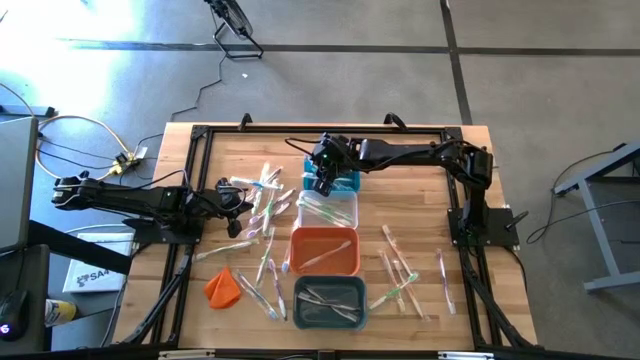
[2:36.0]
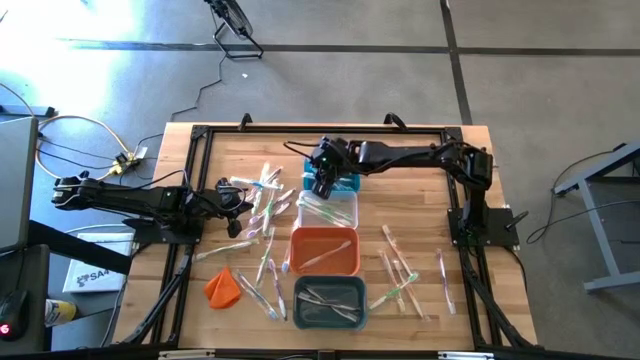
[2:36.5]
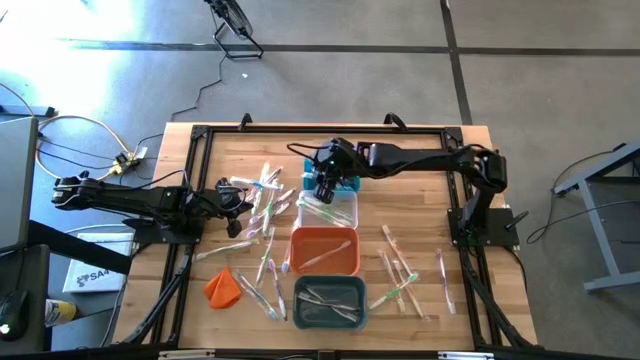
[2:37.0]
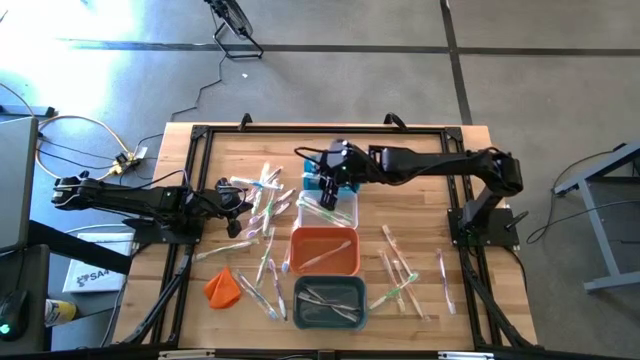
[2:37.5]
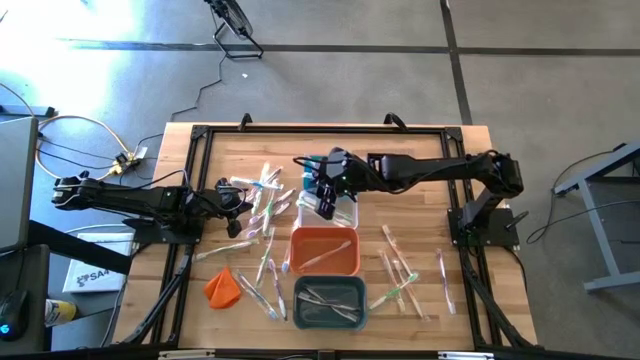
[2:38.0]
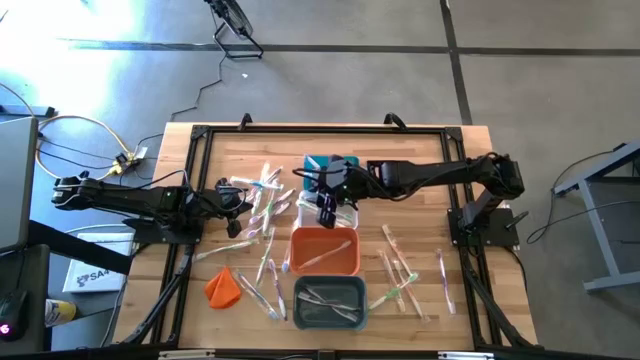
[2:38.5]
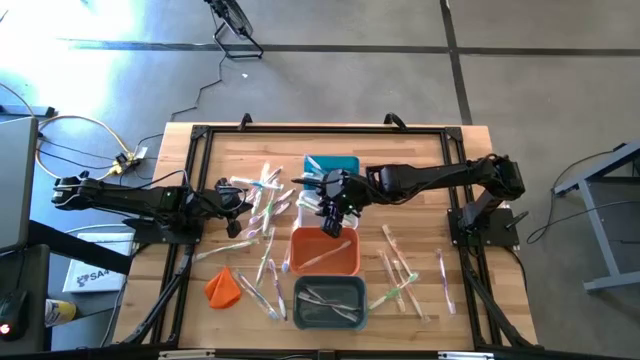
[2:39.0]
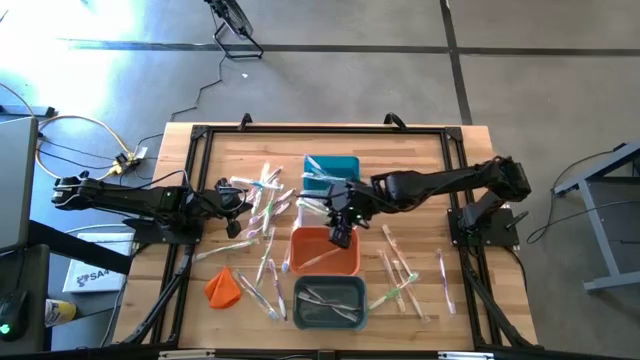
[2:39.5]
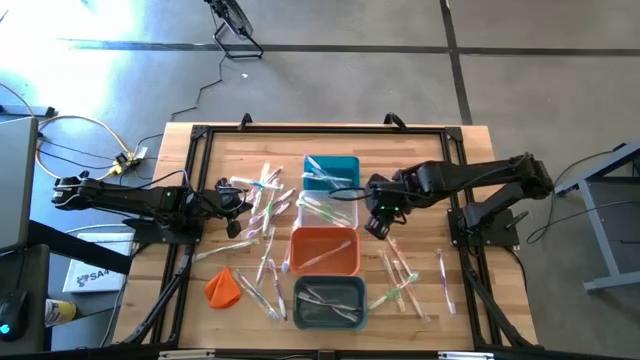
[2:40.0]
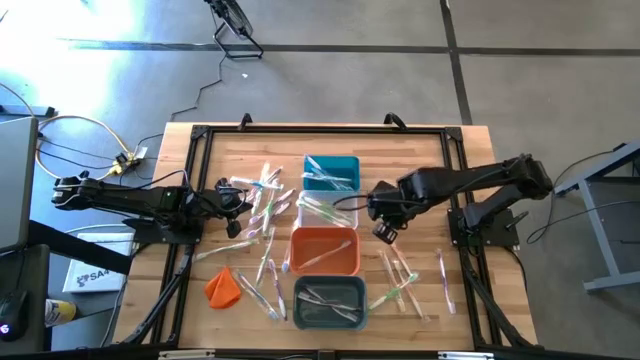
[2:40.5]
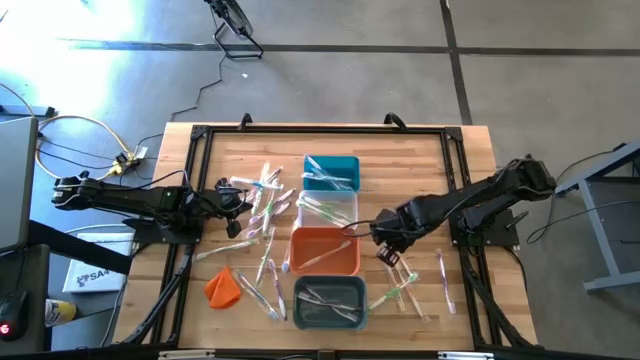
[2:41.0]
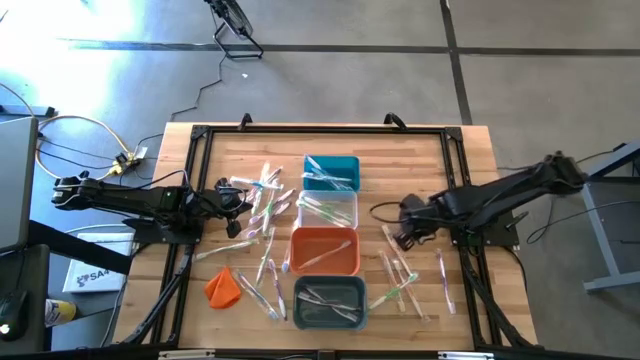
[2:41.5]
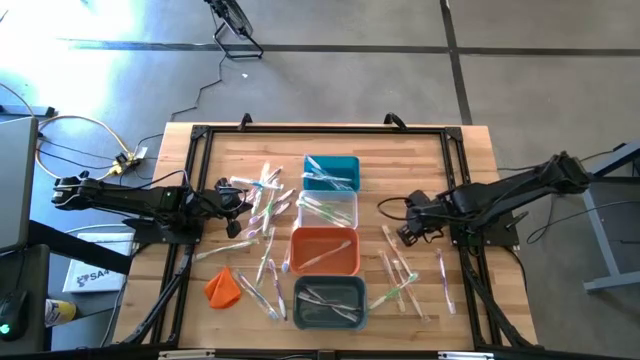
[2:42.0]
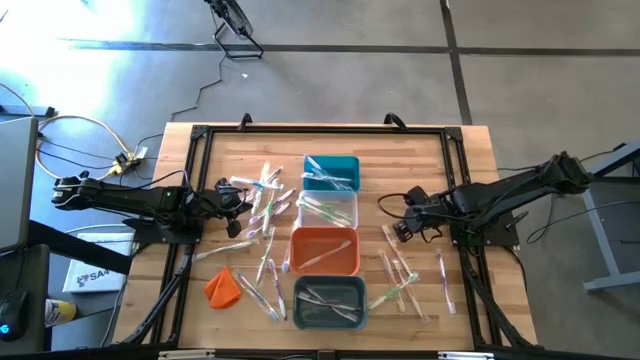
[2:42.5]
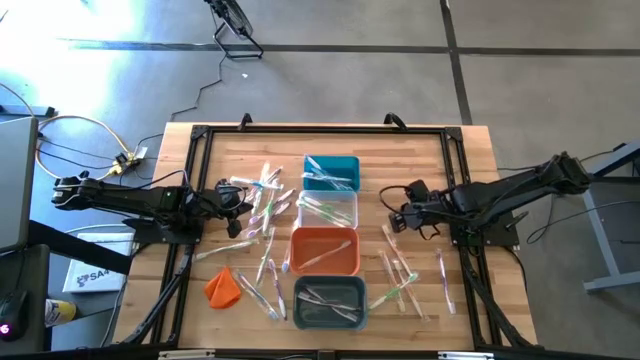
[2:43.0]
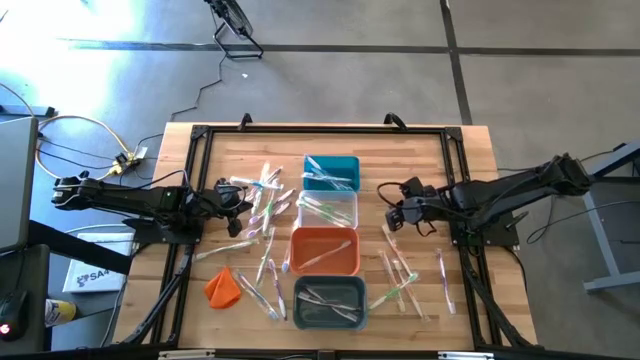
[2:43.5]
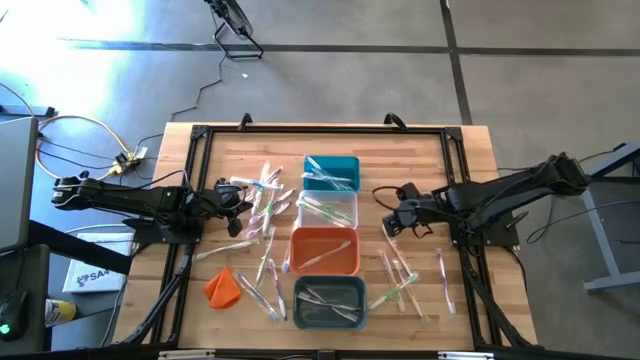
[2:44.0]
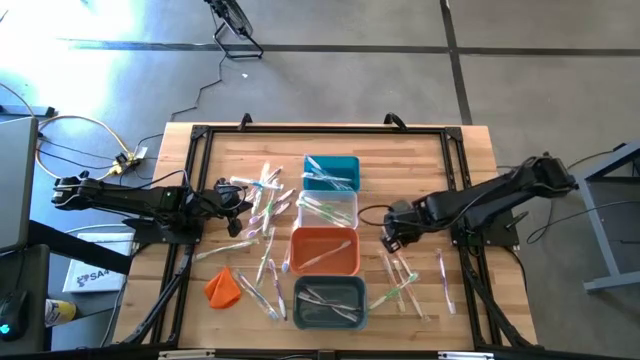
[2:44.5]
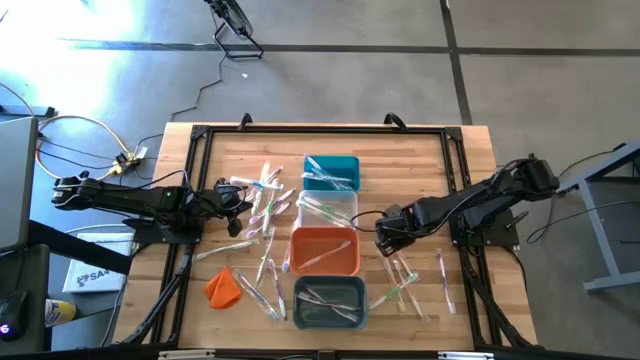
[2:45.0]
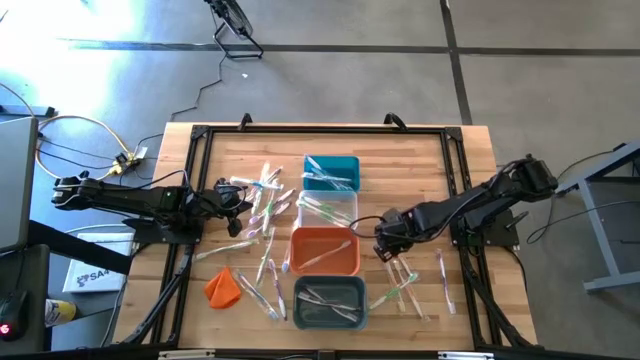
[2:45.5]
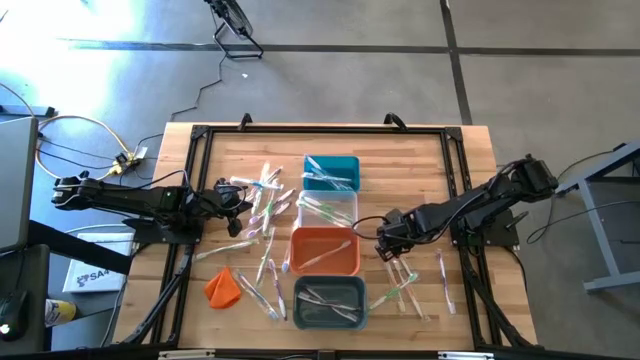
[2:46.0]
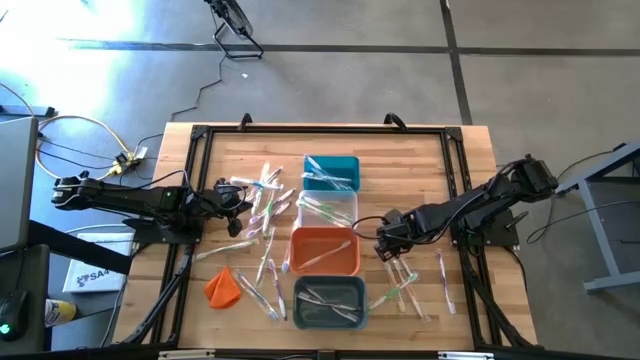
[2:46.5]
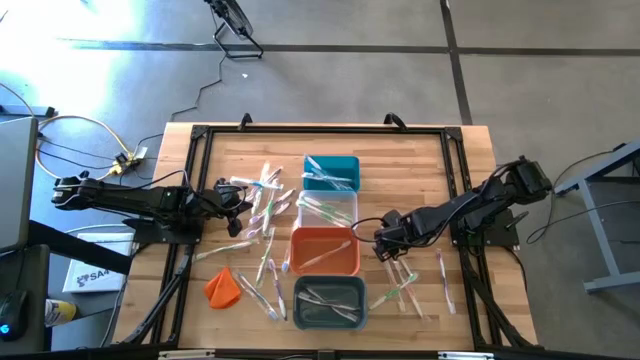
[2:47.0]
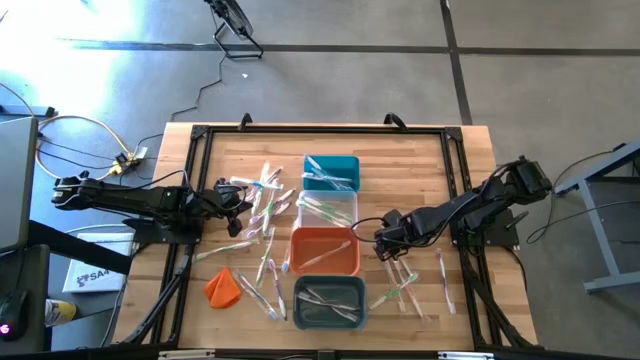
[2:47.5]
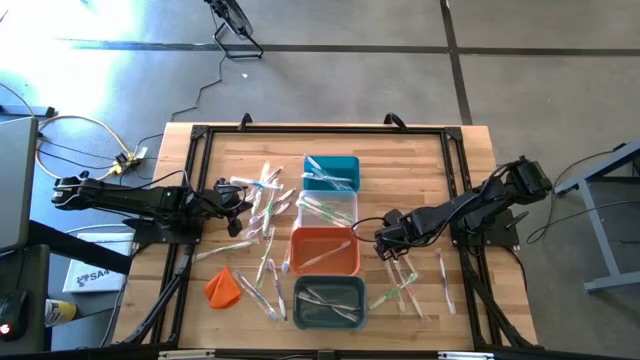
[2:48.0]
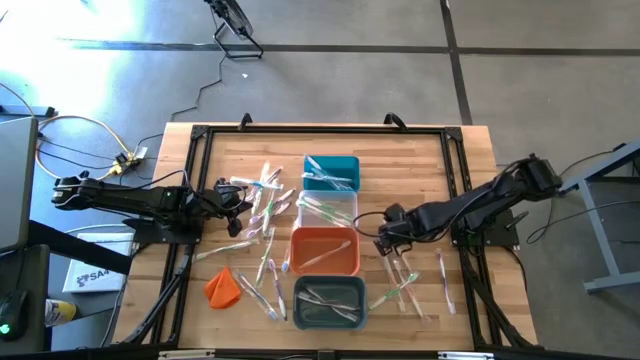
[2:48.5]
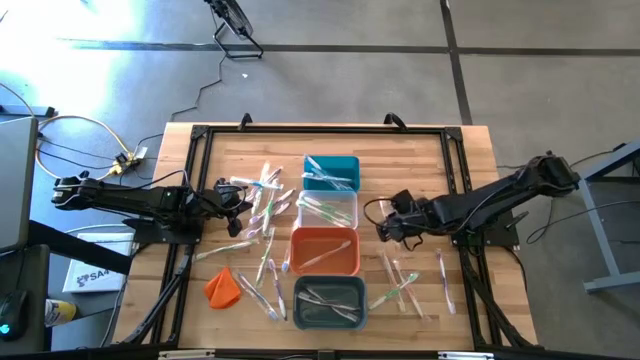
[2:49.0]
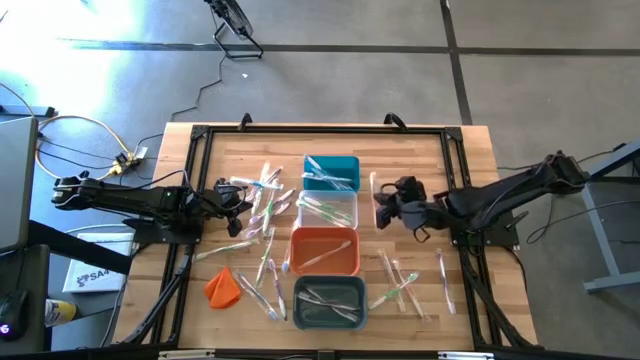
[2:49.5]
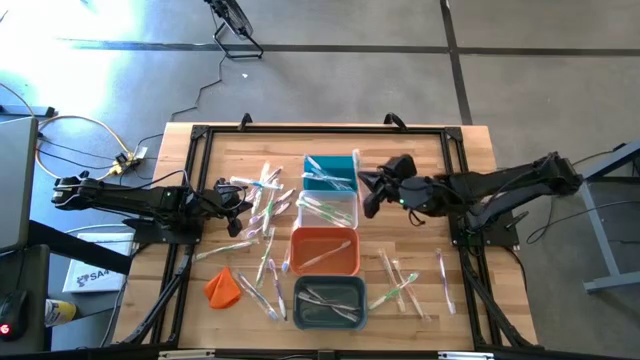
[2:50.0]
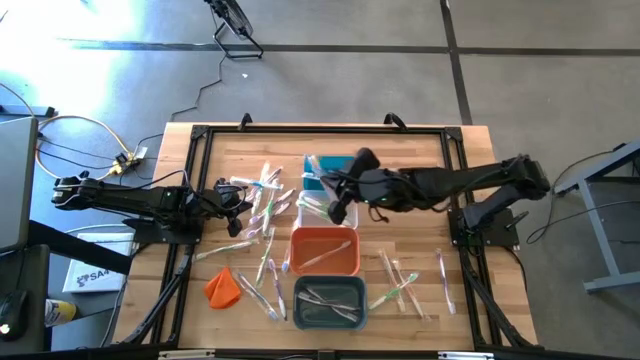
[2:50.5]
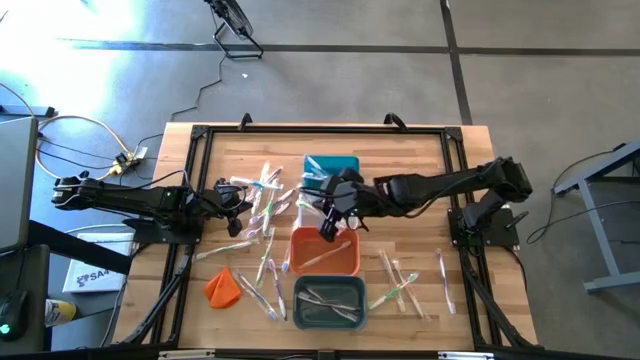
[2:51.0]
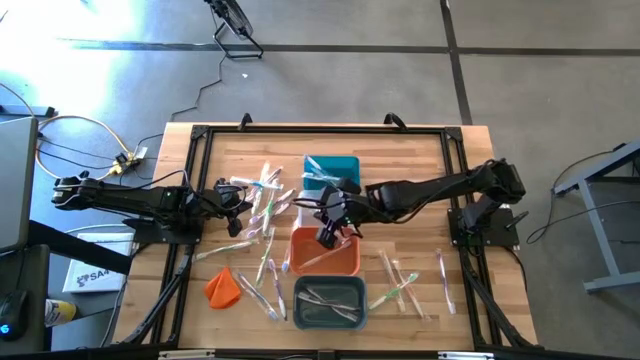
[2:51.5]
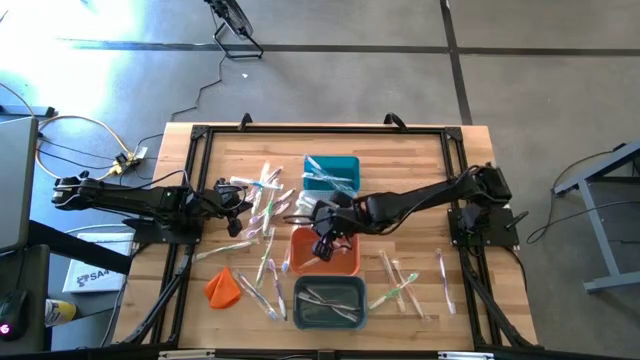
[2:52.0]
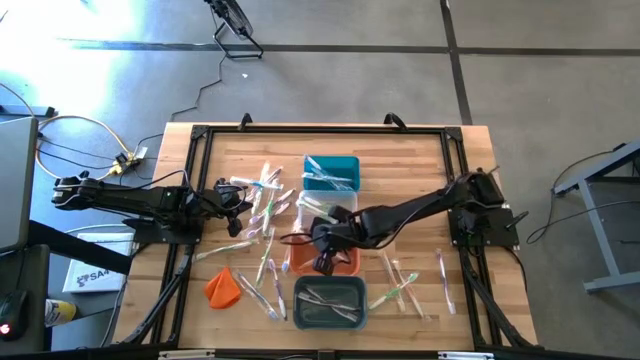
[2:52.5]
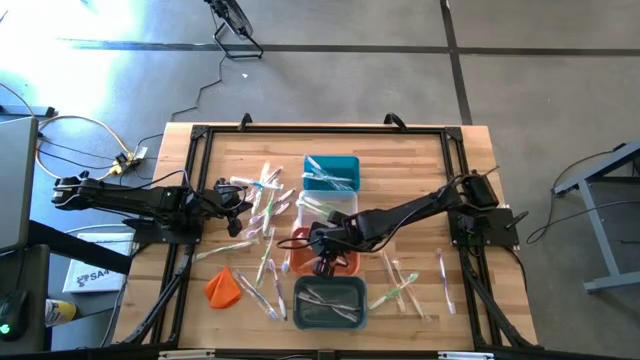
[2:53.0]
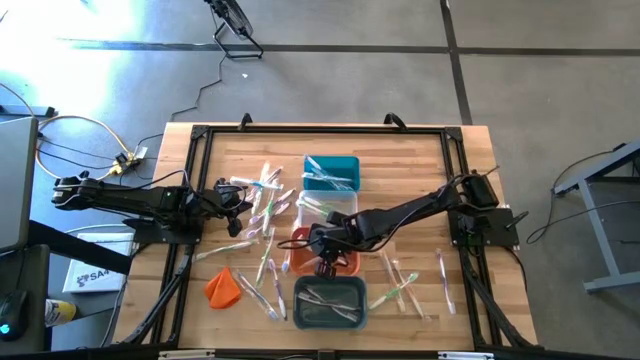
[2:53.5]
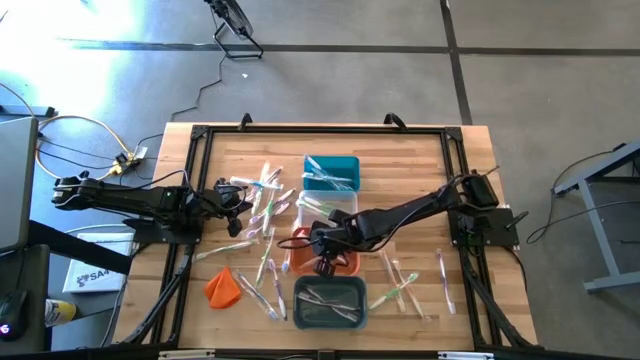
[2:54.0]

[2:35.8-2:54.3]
Task: Pick & Place Toothbrushes
Put the orange toothbrush into the orange bin

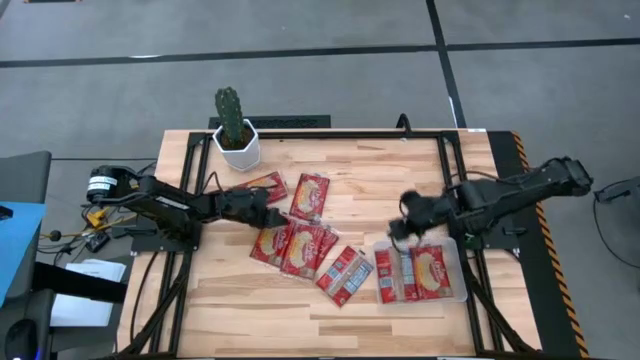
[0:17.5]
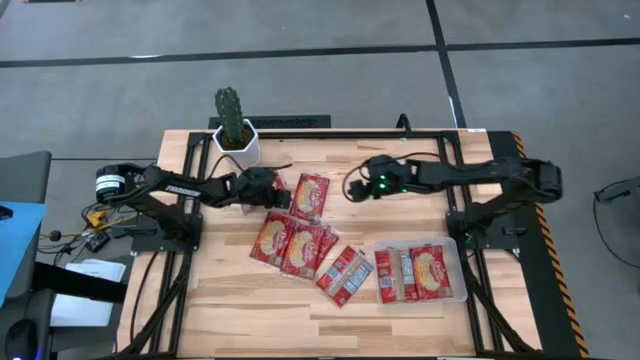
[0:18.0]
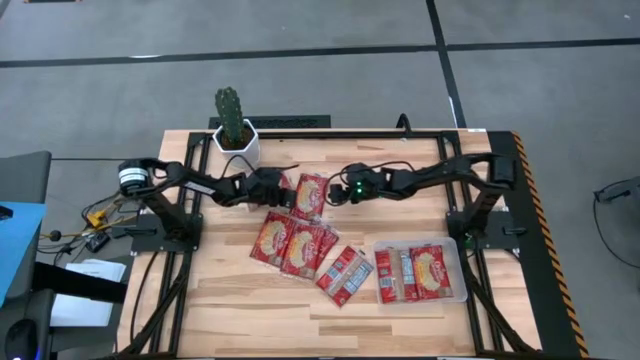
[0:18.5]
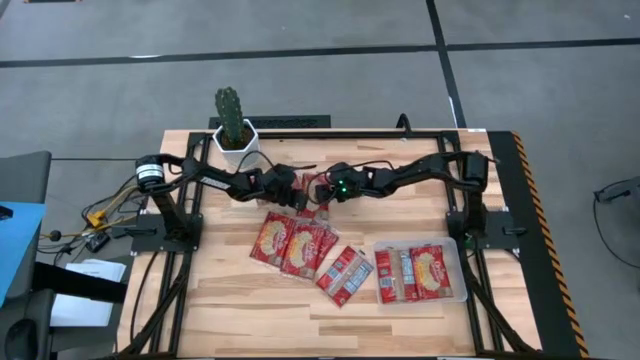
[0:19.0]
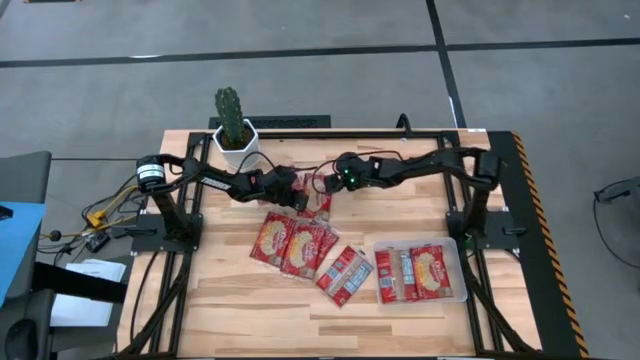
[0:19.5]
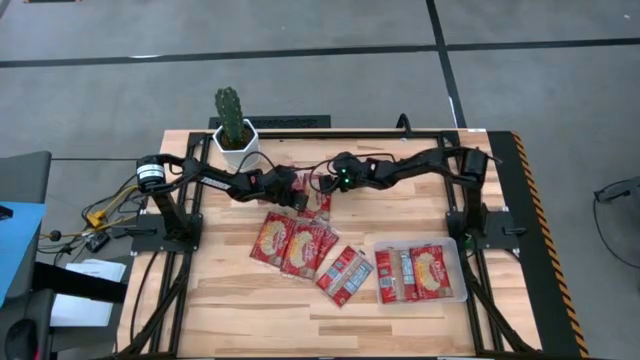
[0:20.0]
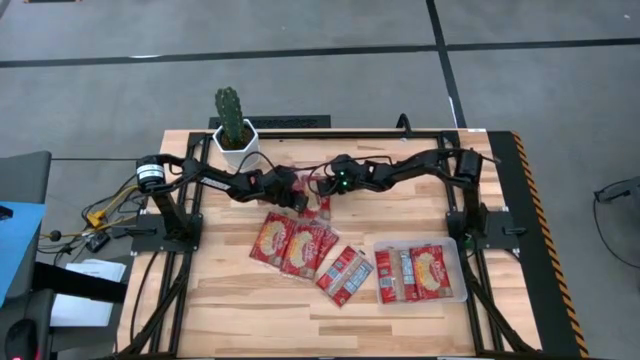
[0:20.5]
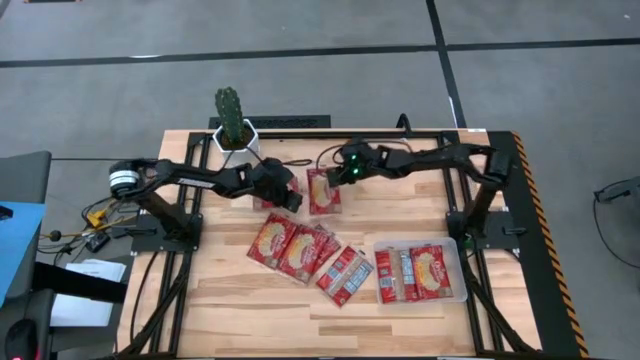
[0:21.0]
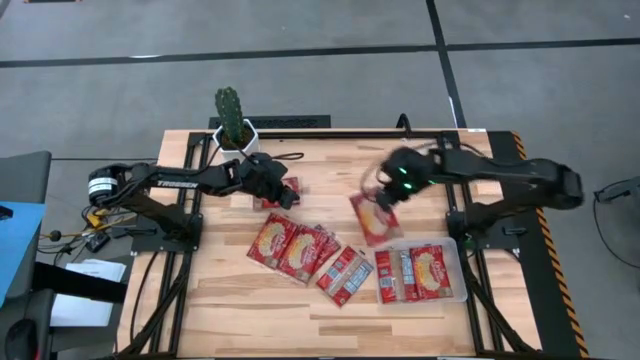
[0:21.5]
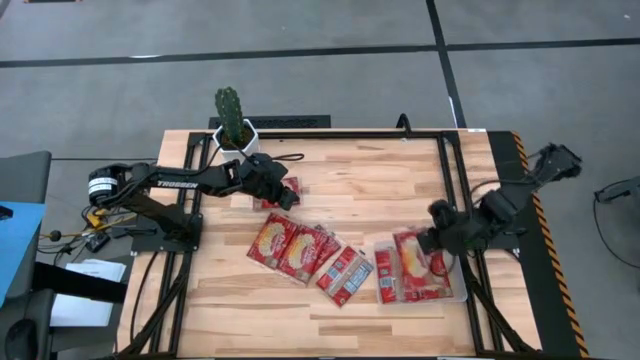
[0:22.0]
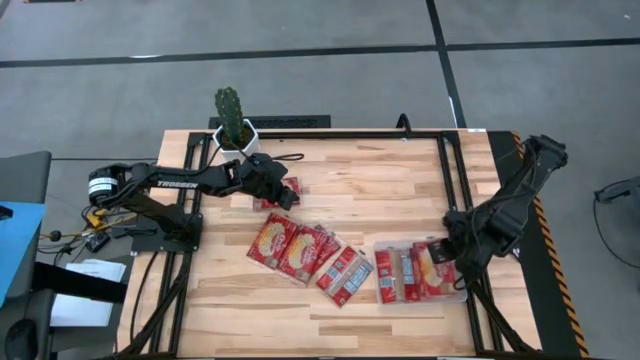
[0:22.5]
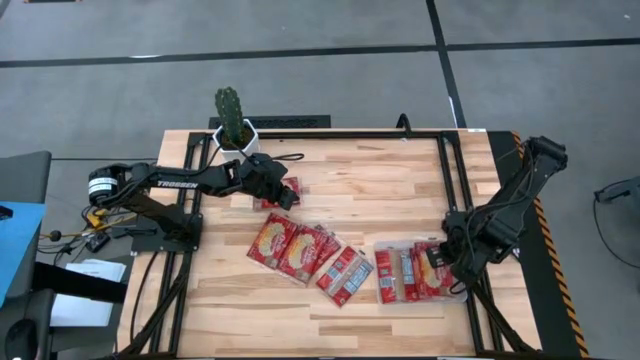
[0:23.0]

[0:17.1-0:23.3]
Task: Sort popcorn bags into baskets
Put the popcorn bag into the transparent bin
